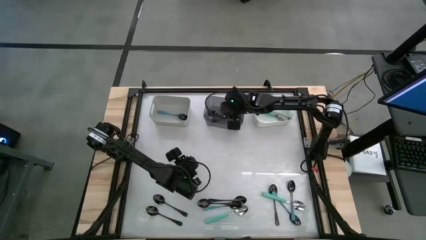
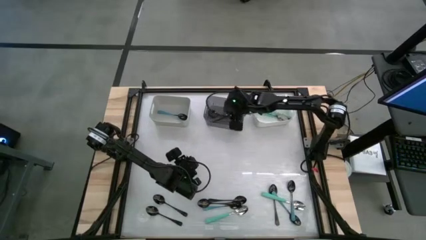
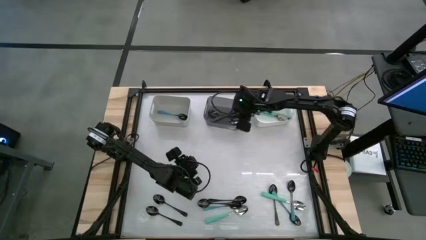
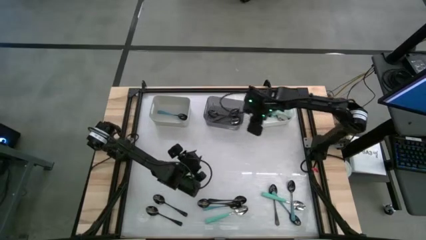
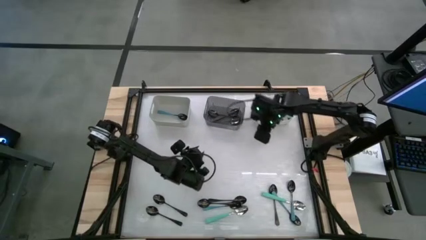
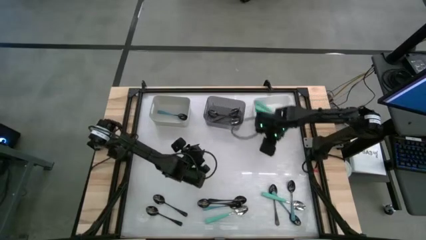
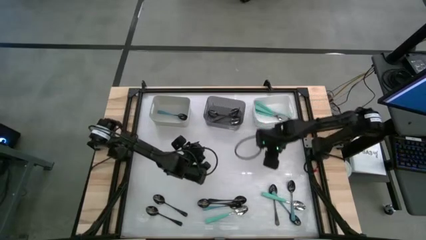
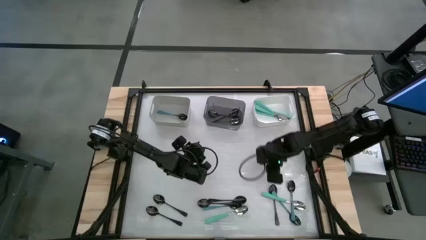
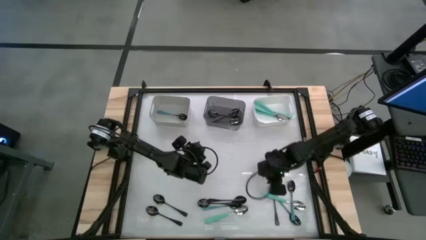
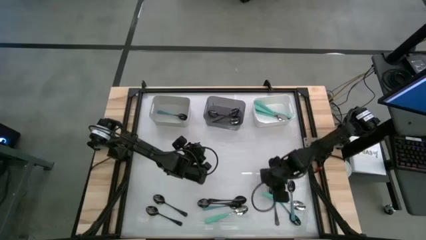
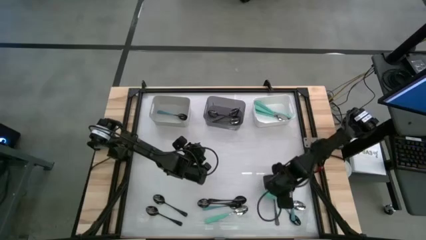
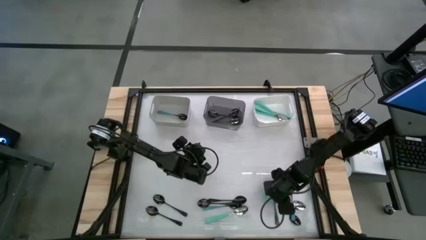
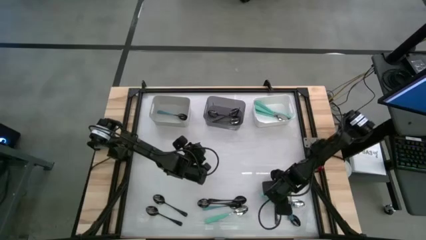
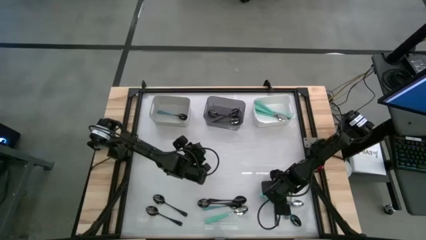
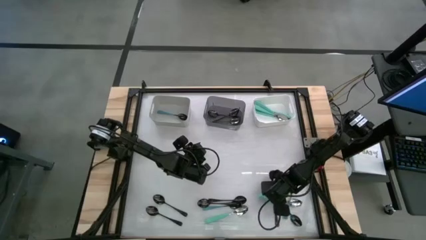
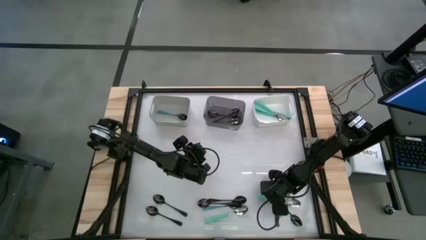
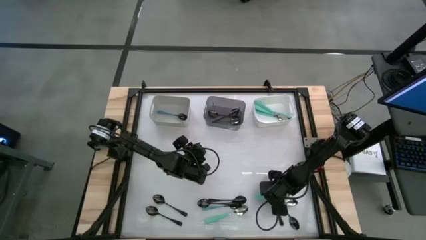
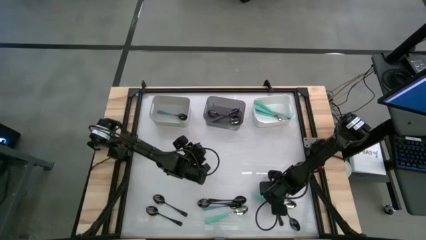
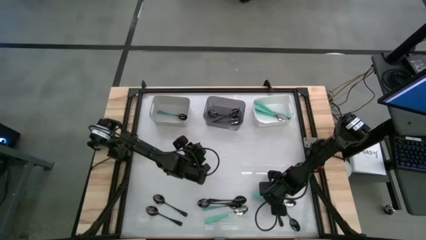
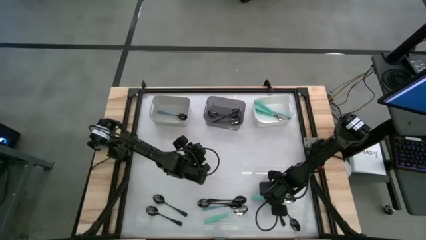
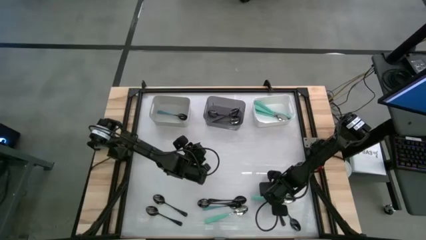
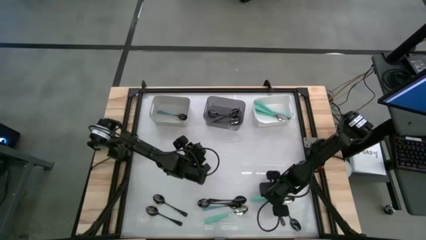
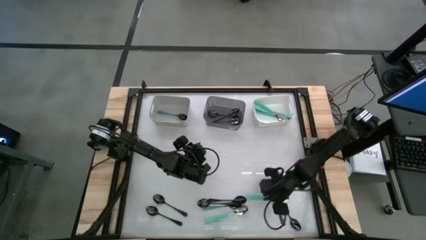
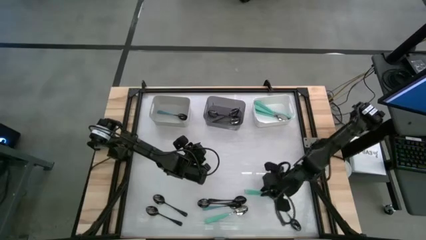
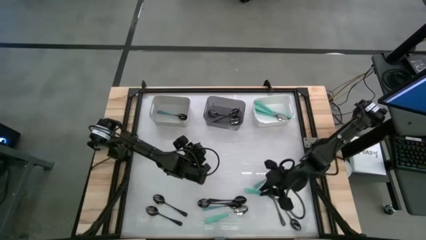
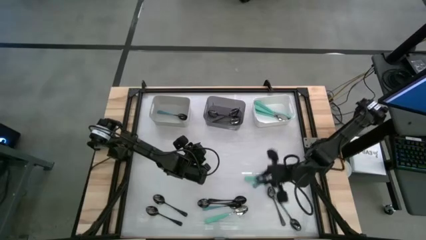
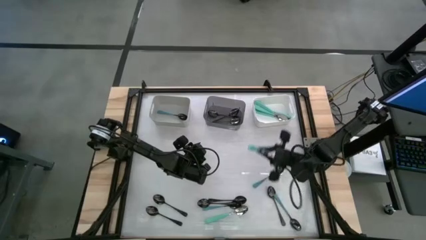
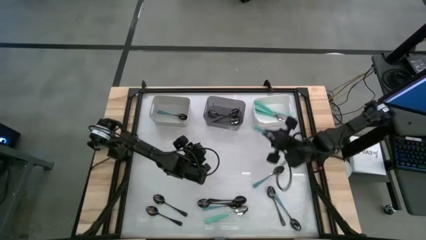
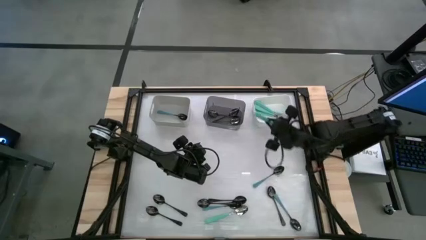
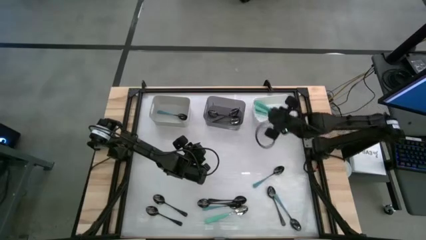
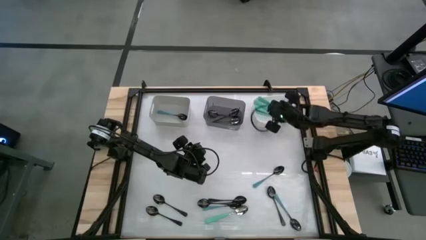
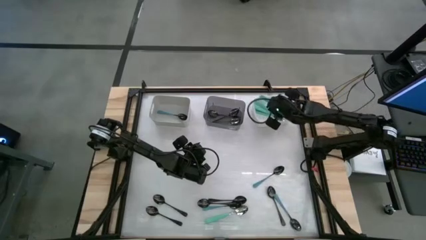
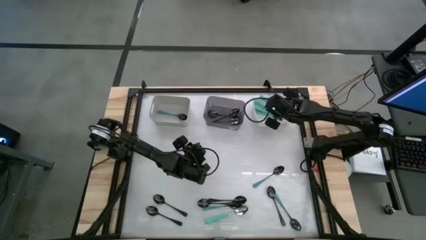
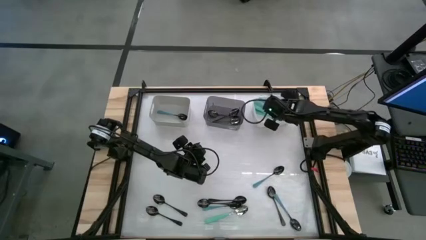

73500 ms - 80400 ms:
Task: Sort silverware by color (type)
Put the green spoon into the white bin

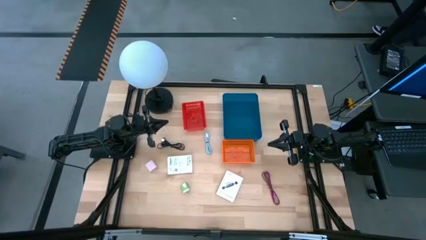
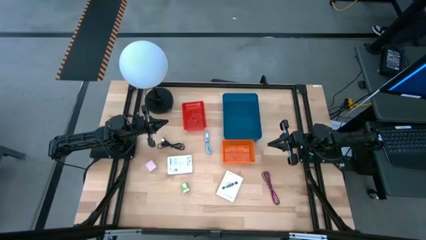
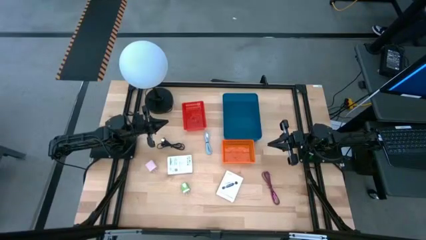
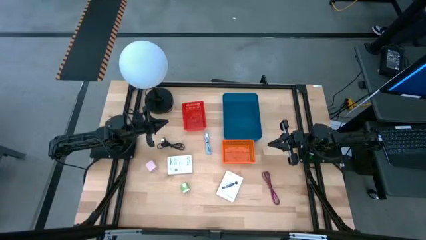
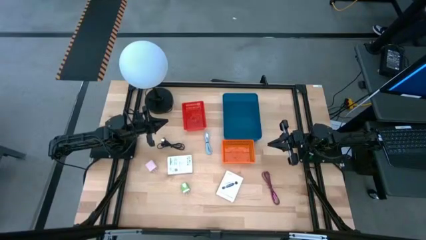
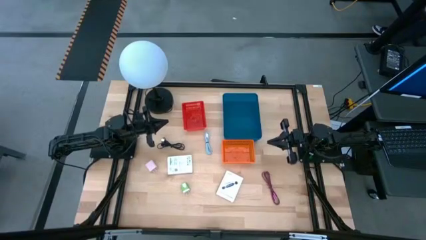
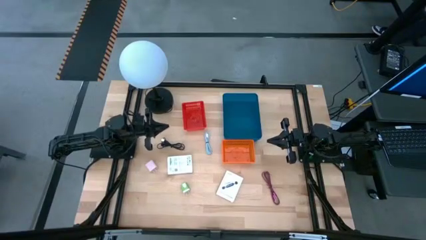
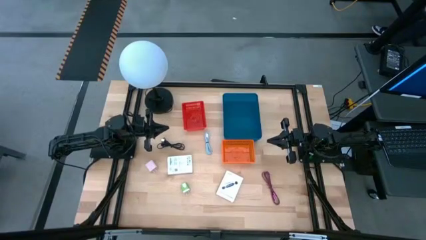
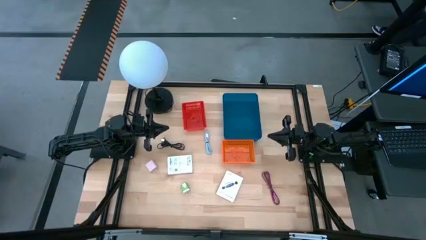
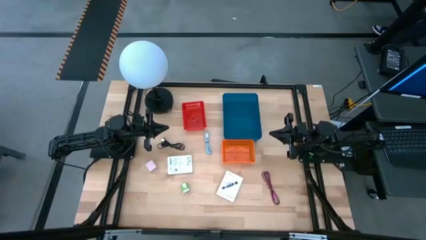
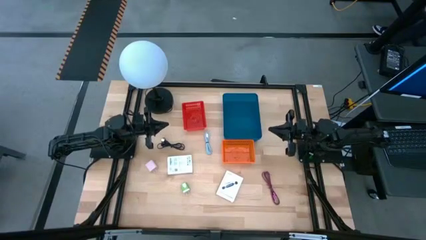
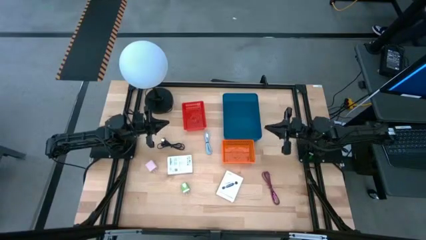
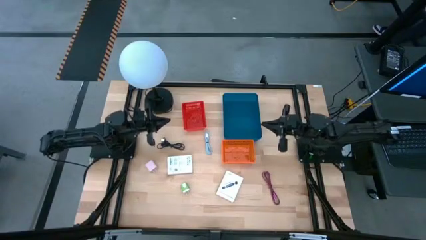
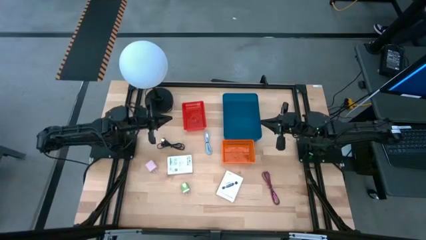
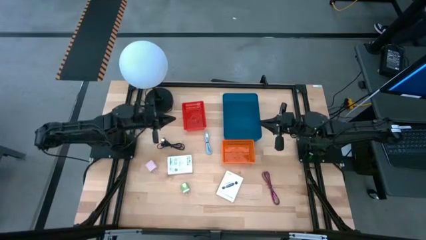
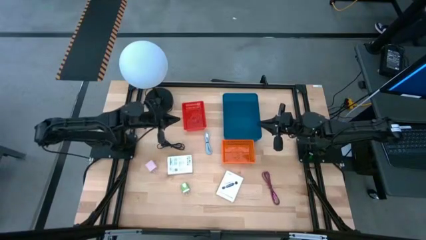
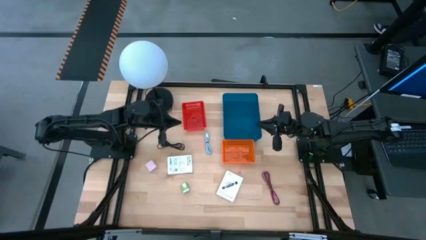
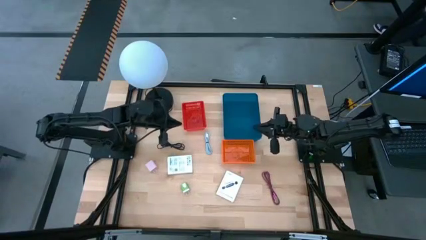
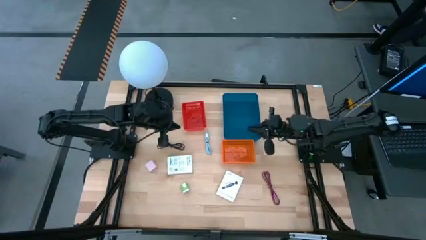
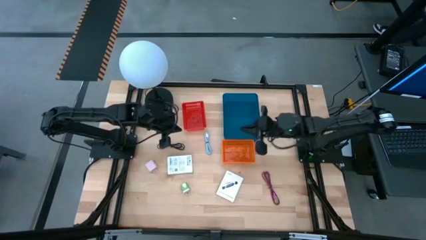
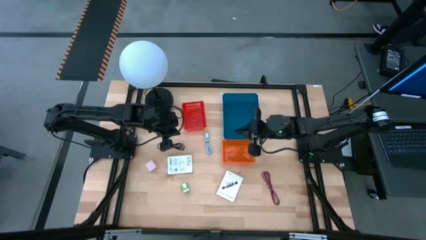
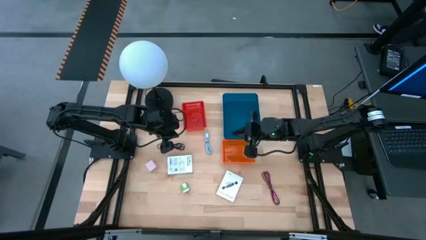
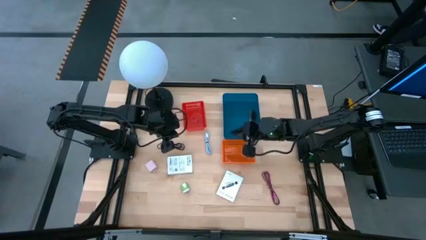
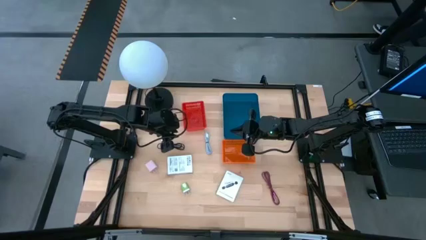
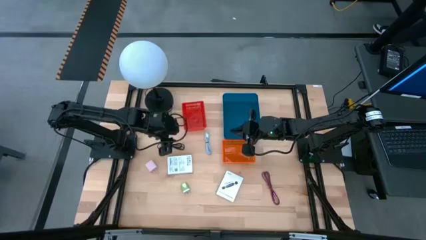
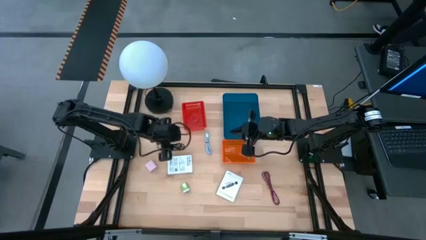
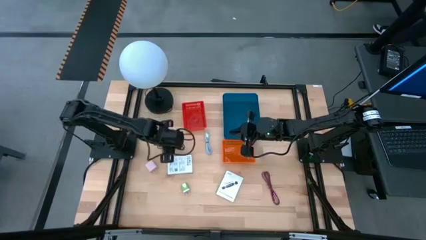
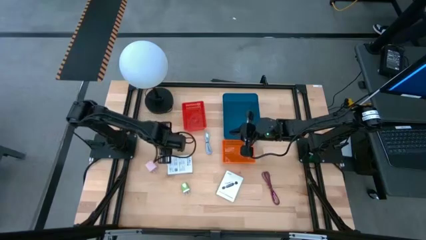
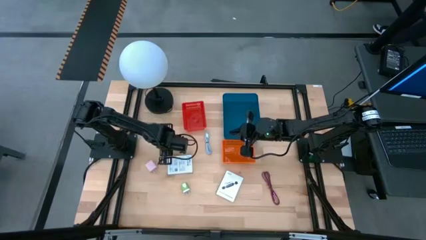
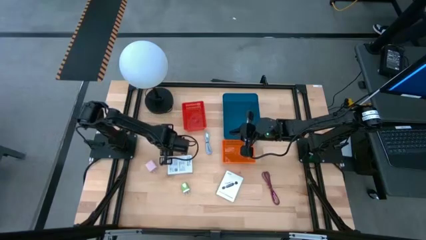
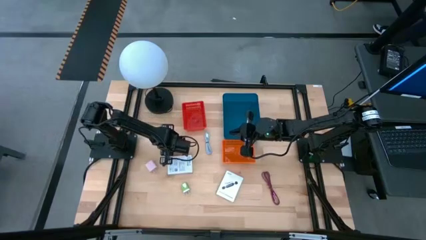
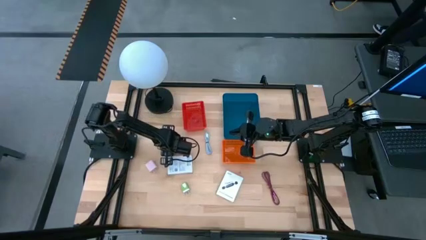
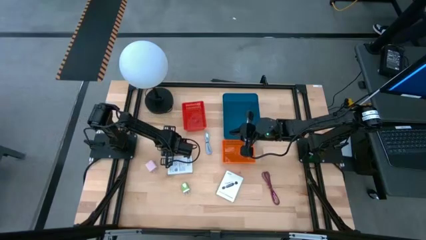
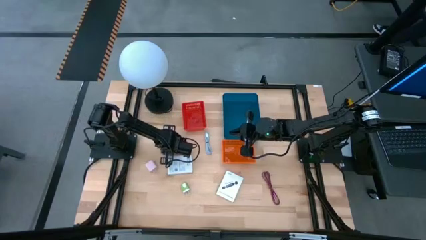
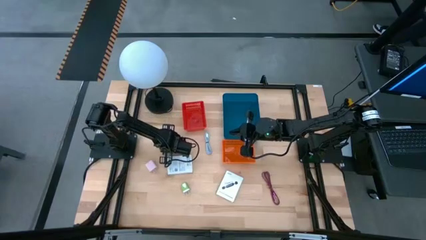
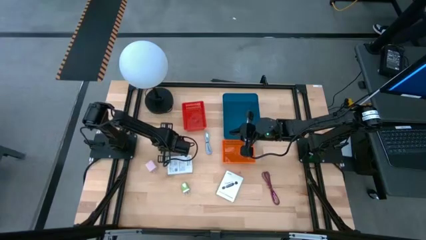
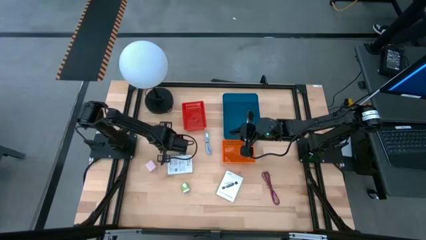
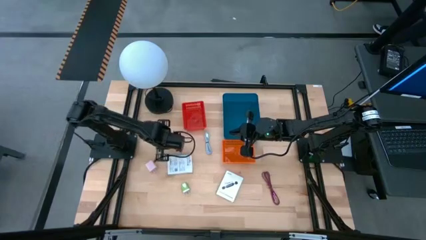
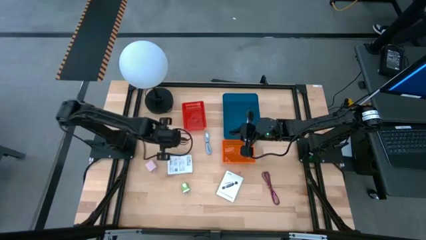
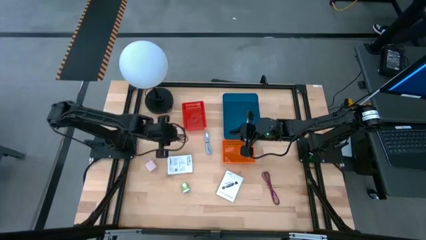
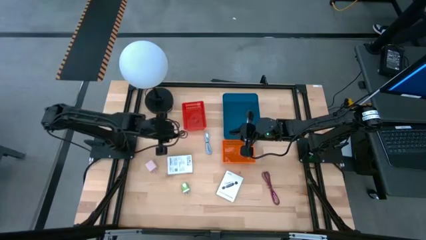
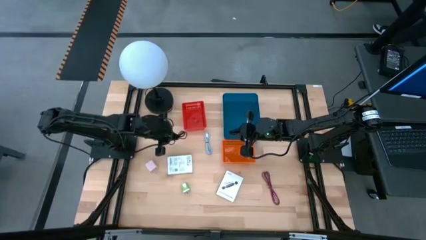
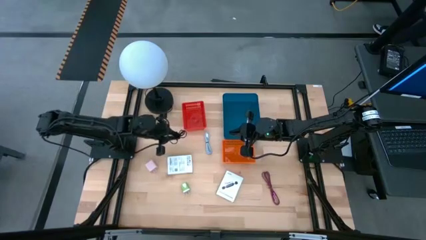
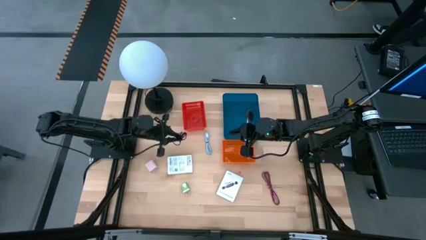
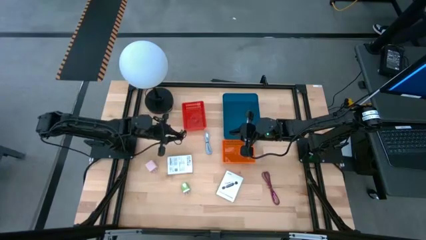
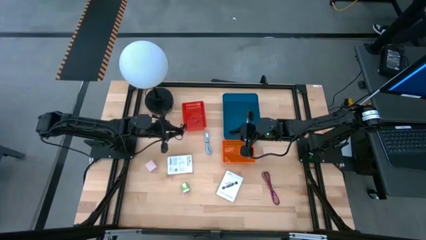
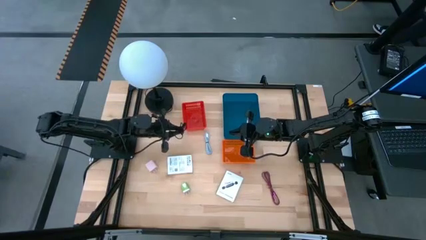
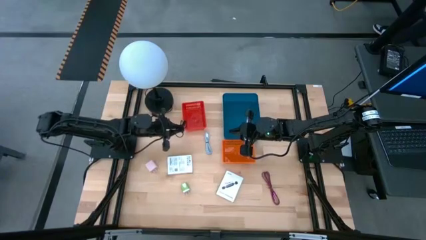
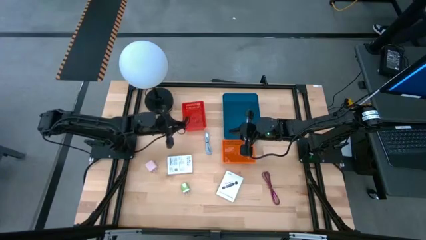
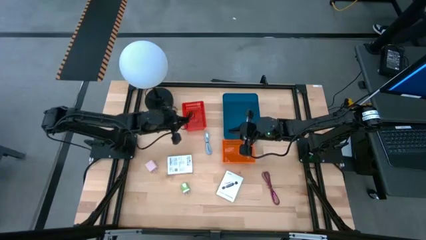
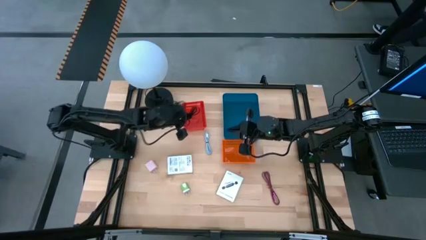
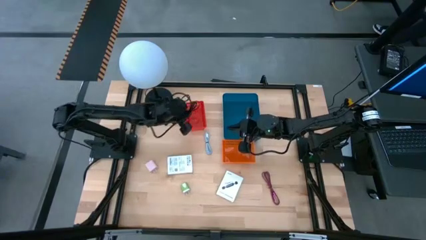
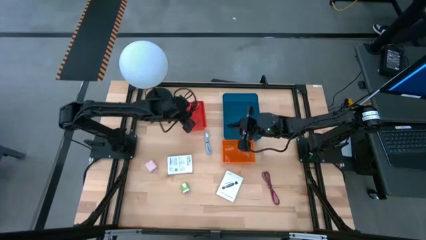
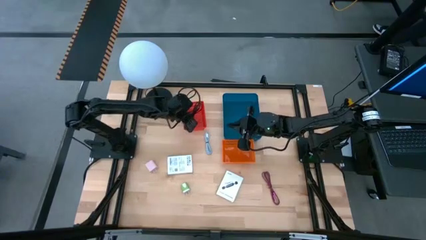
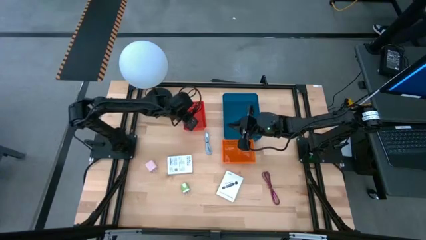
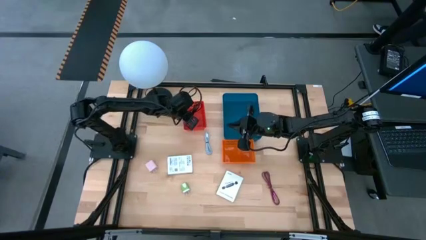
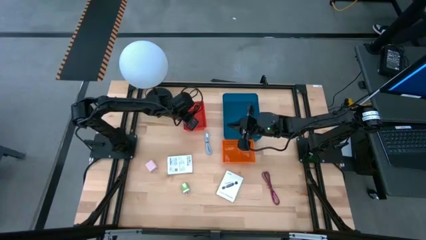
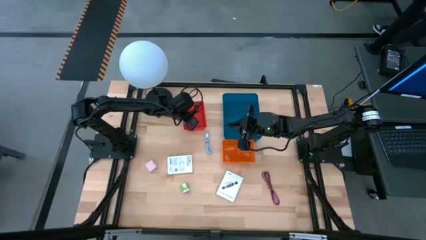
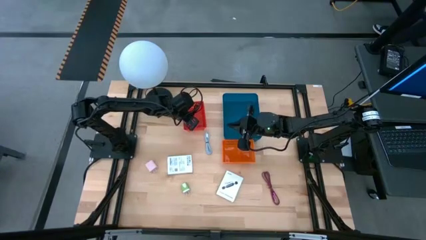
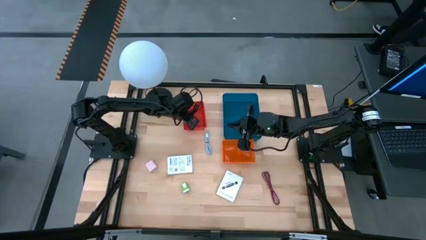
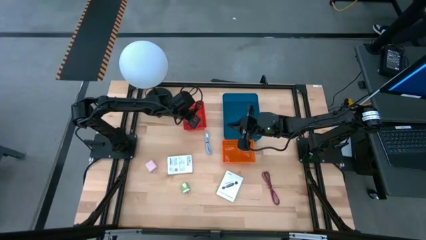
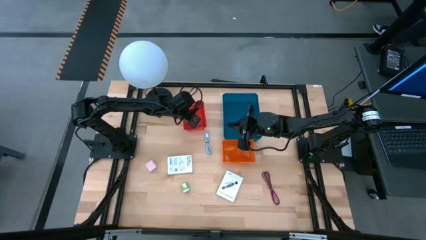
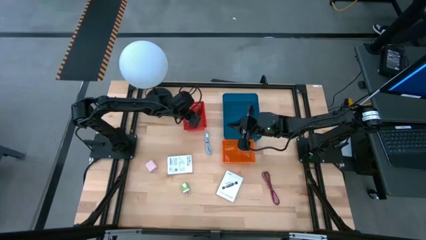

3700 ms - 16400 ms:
Task: Pick and place items into bin
Put the black charger cable into the red bin
